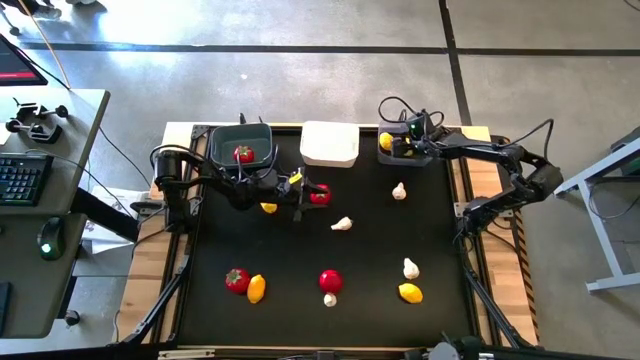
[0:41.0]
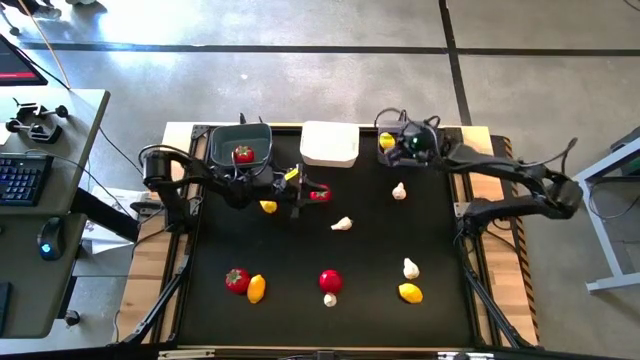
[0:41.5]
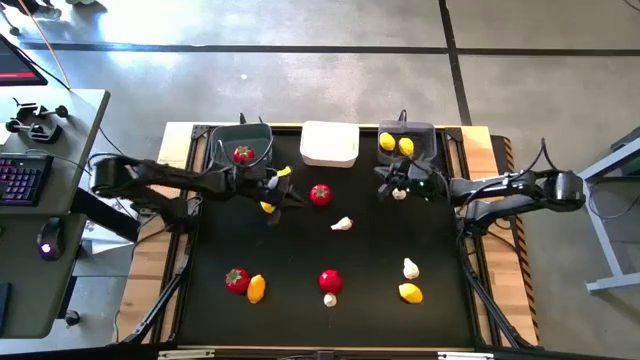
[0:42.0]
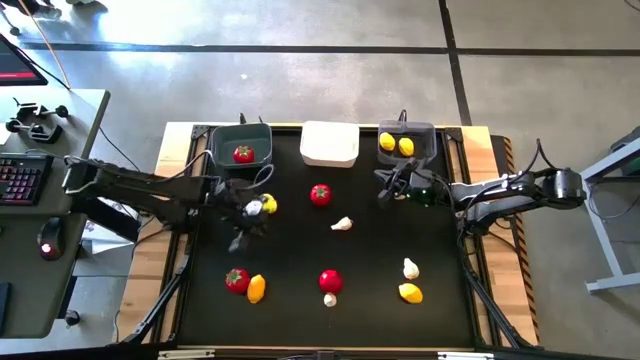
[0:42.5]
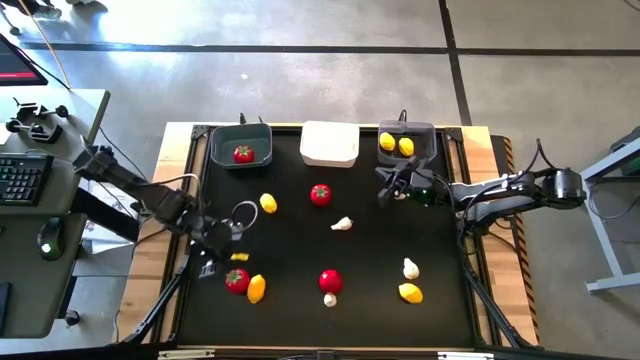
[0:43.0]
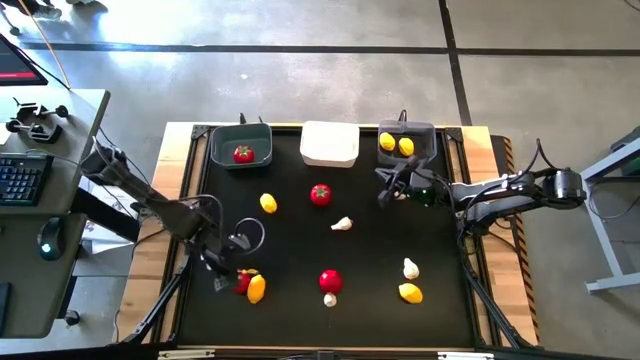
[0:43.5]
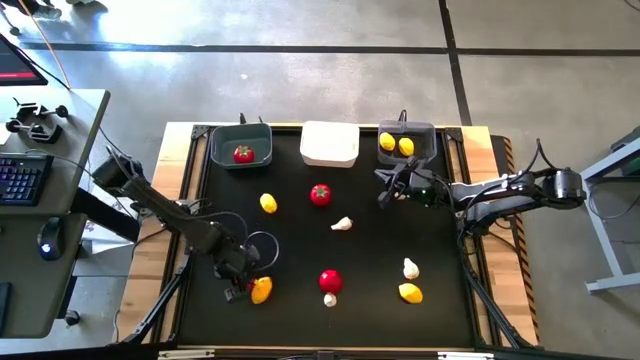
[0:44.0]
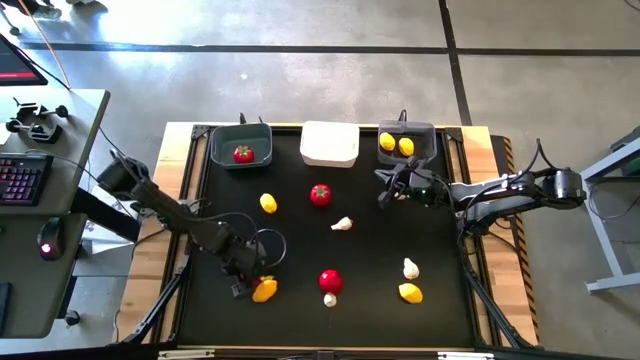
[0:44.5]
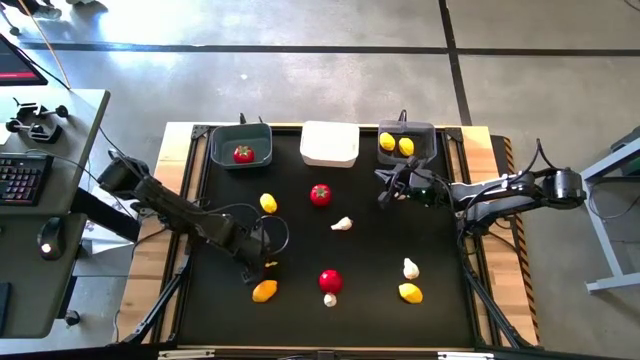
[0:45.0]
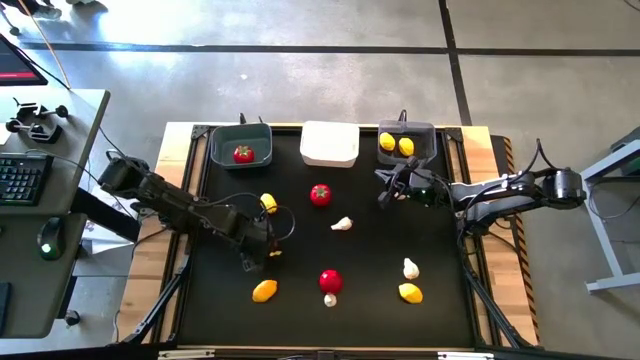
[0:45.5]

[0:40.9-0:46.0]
Task: Sort produce into baskets
Put the bottom left red tomato into the gray bin

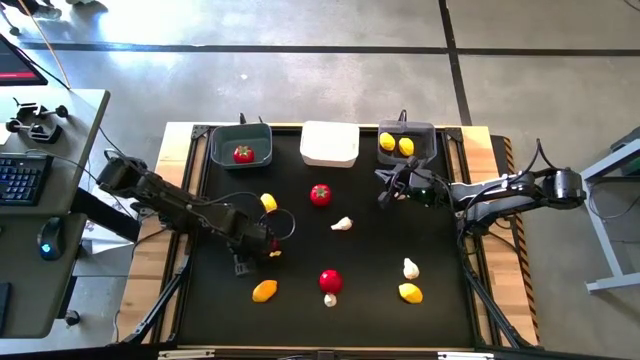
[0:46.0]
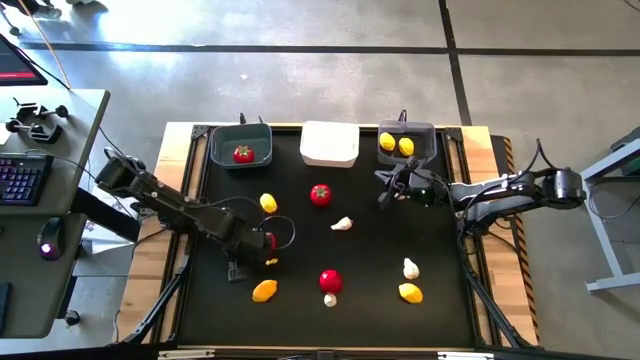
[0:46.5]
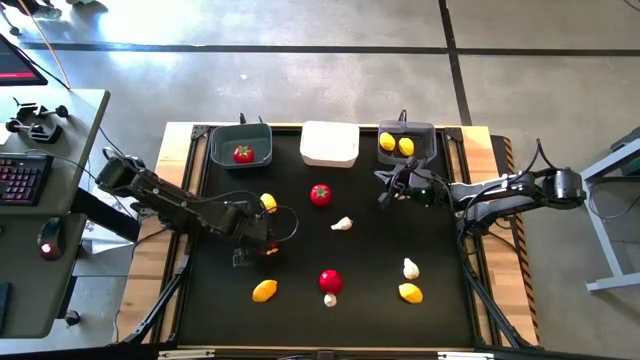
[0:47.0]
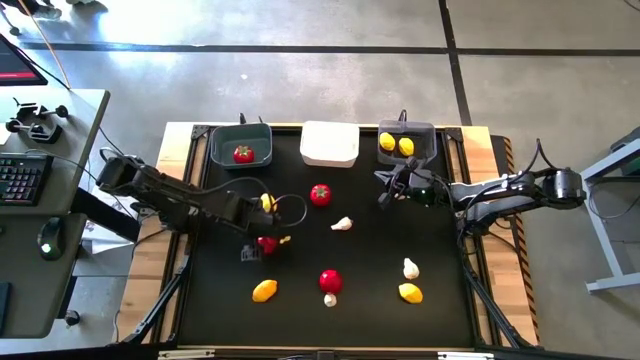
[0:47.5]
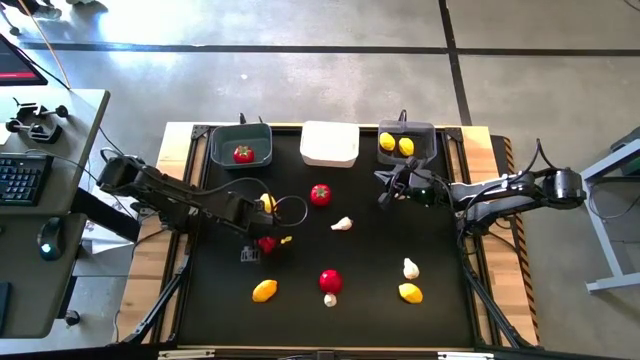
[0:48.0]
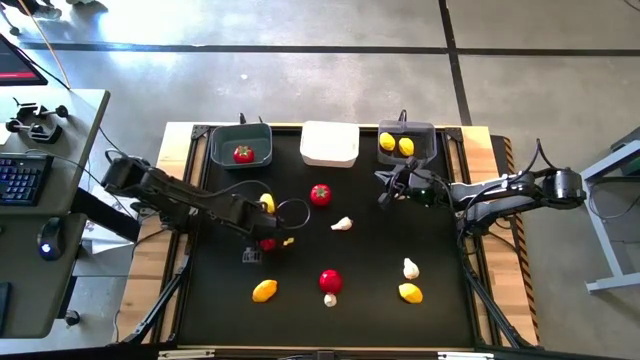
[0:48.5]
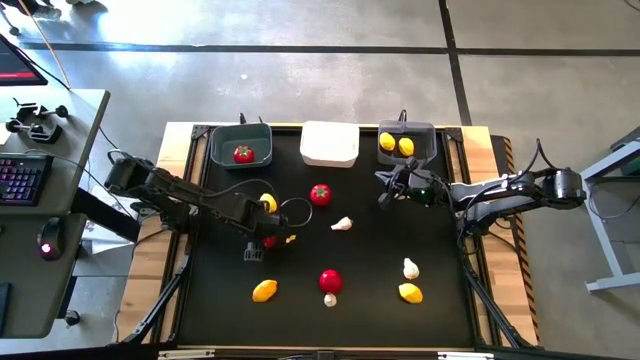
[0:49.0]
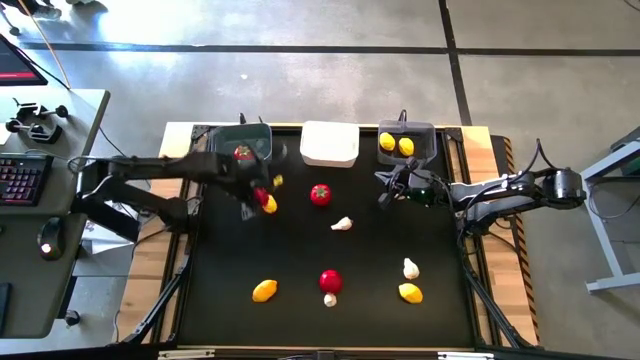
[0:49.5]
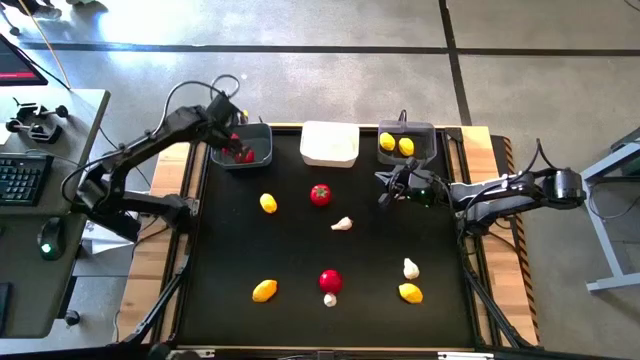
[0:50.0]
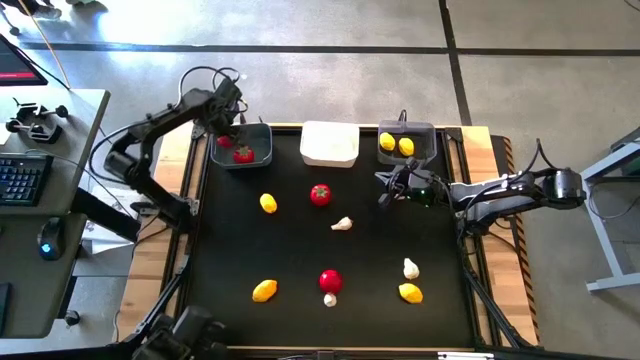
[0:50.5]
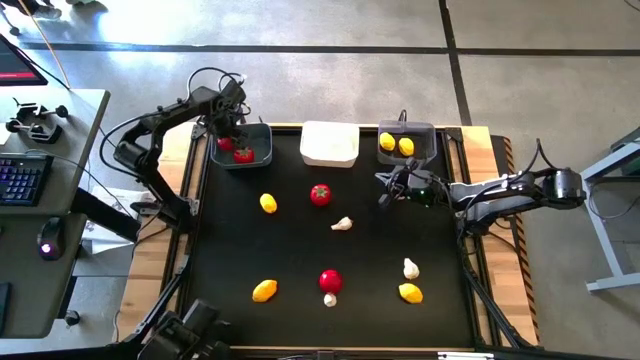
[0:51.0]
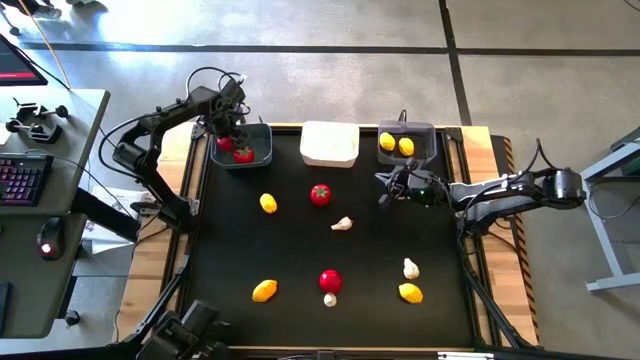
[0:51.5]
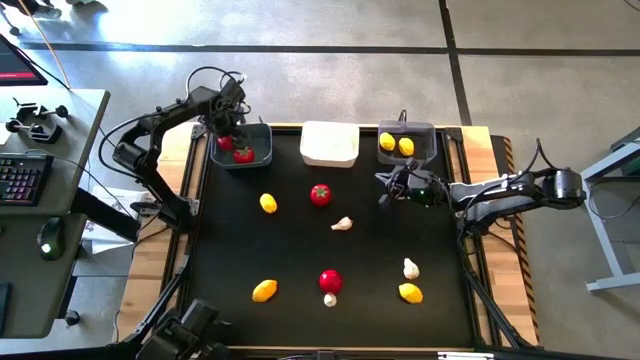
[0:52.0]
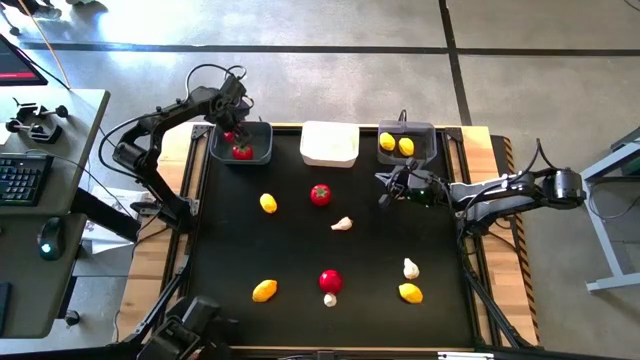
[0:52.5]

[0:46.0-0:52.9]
Put the bottom left red tomato into the gray bin

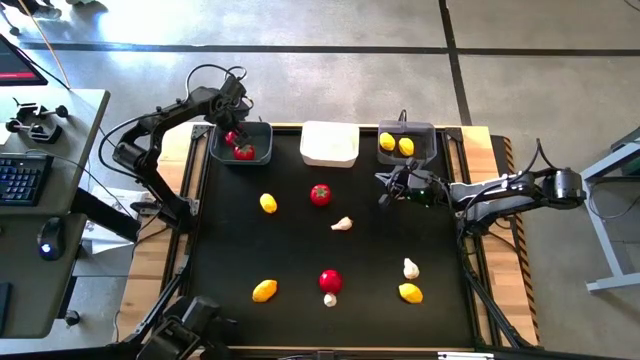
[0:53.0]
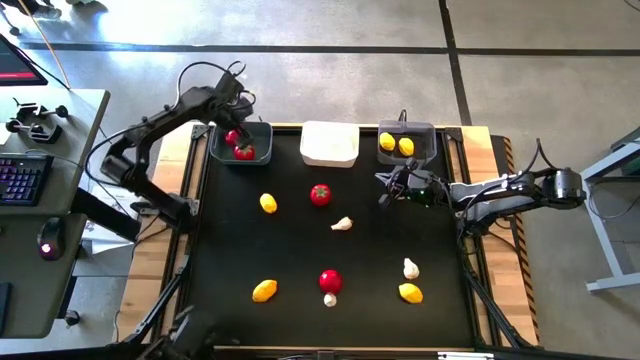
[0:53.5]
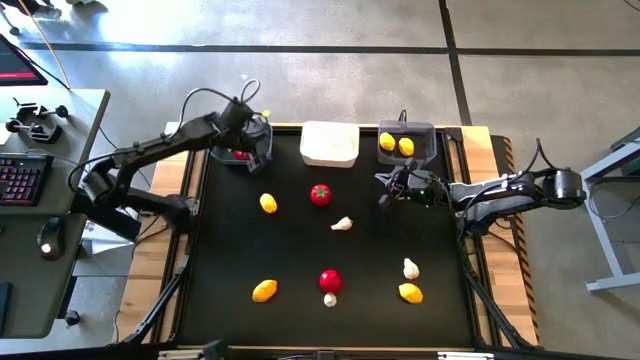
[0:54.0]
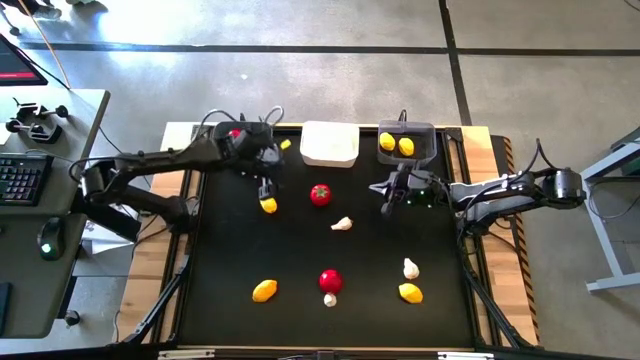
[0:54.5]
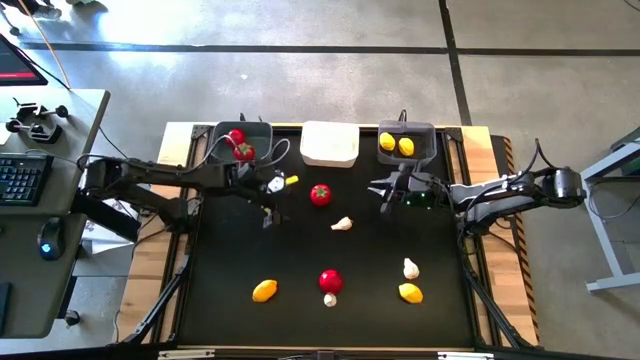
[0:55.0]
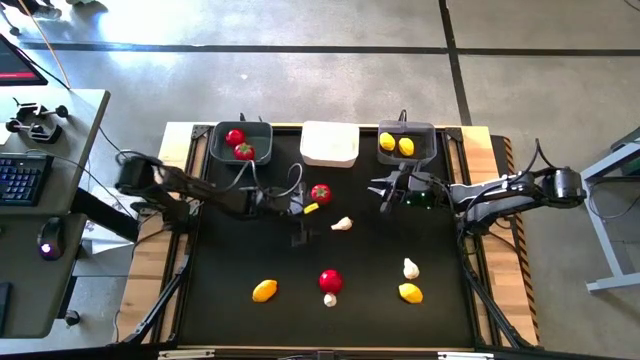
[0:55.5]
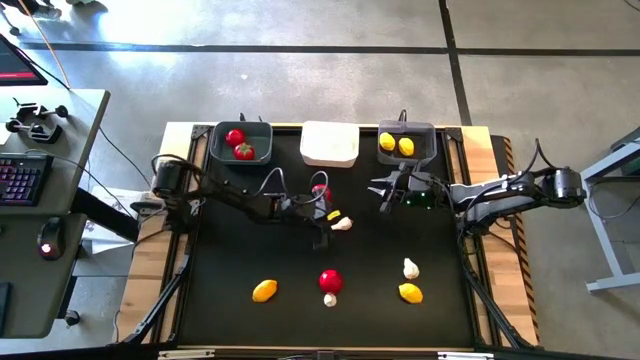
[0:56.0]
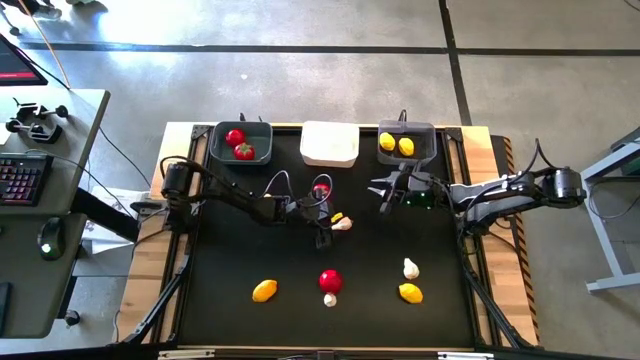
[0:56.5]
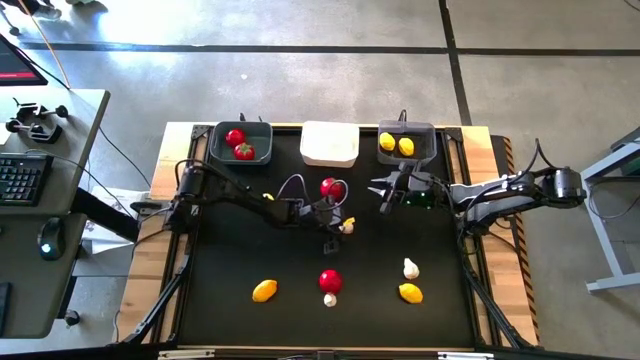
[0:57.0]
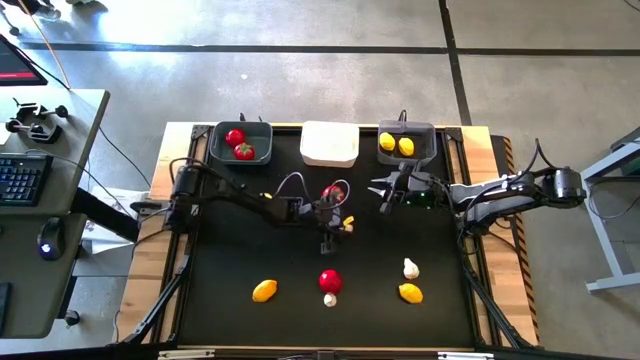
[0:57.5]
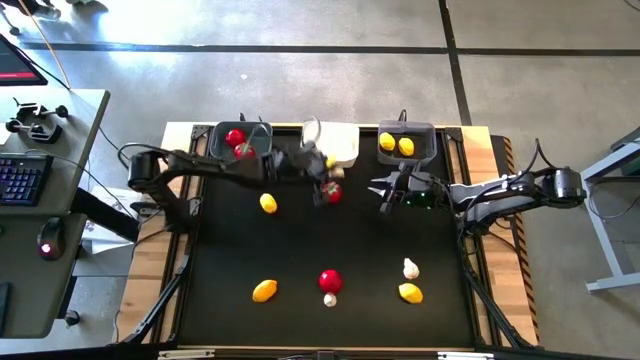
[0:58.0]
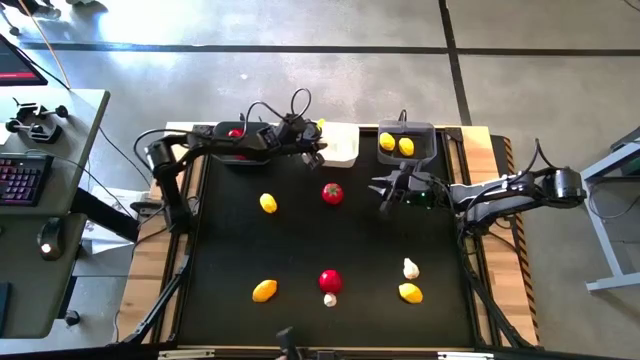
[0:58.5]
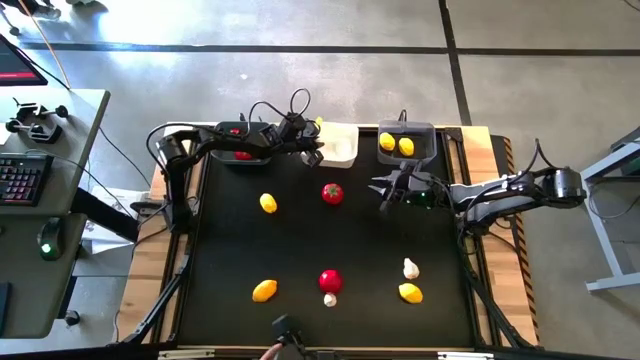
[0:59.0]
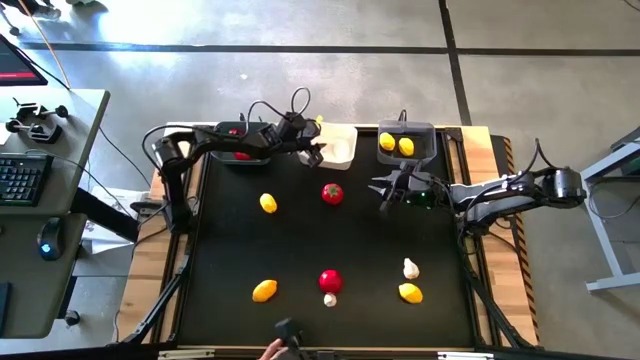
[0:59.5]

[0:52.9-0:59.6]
Put the top white garlic into the white bin

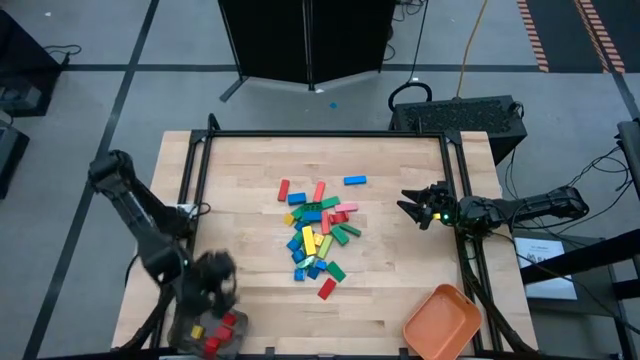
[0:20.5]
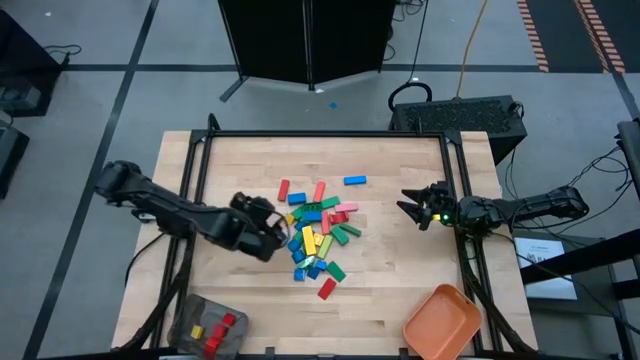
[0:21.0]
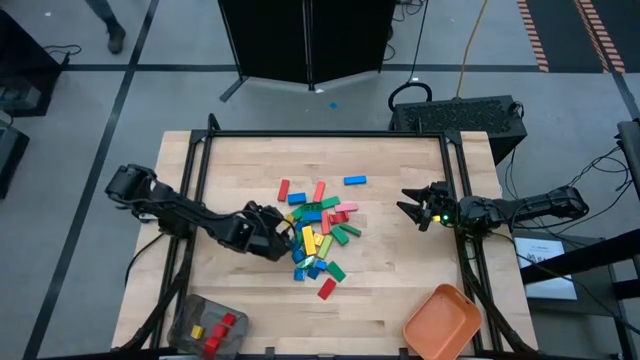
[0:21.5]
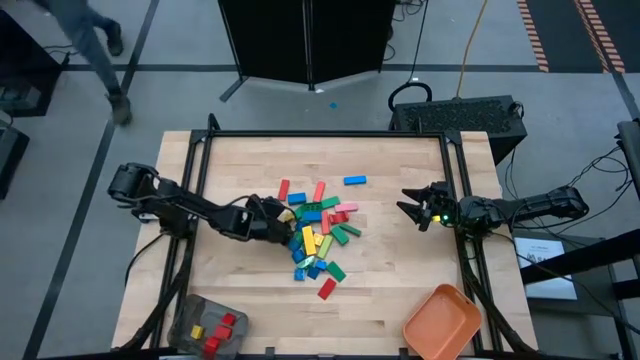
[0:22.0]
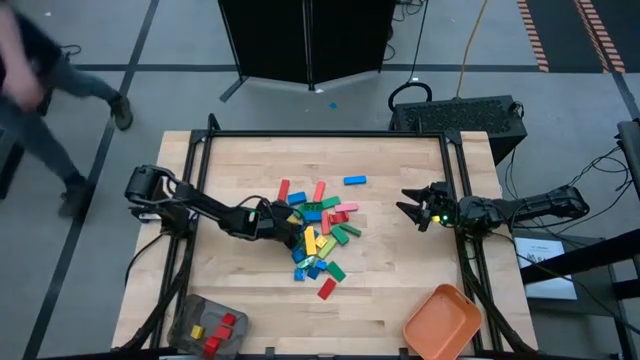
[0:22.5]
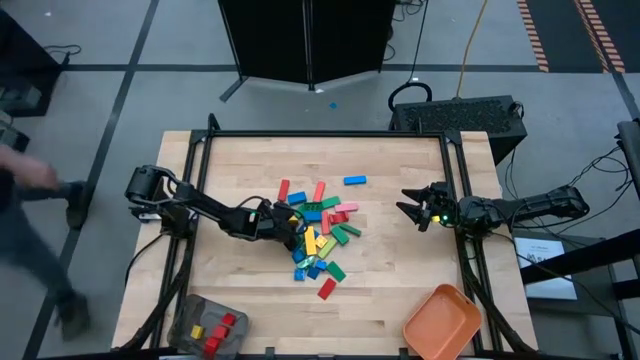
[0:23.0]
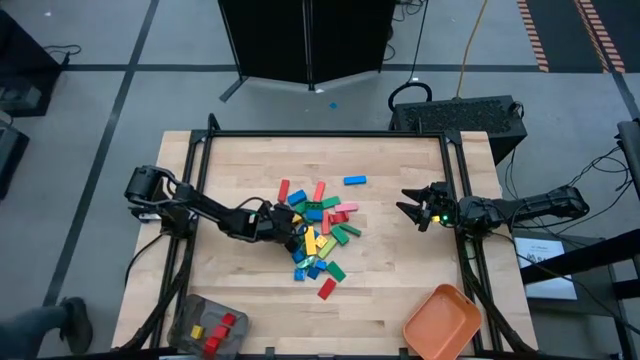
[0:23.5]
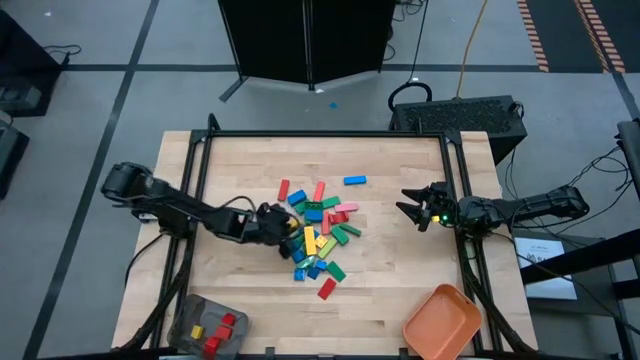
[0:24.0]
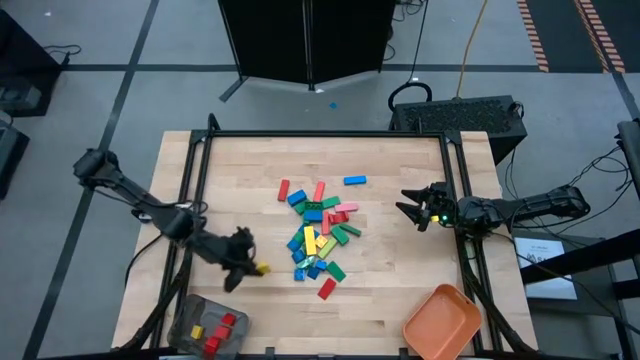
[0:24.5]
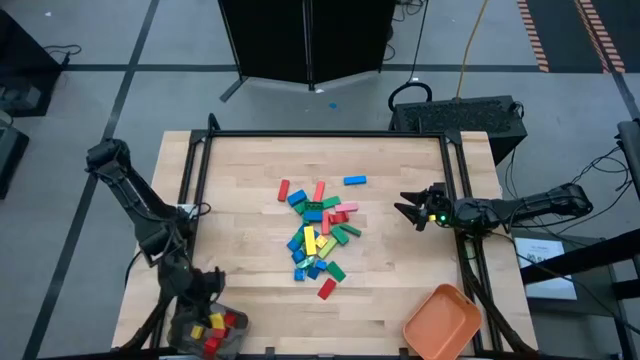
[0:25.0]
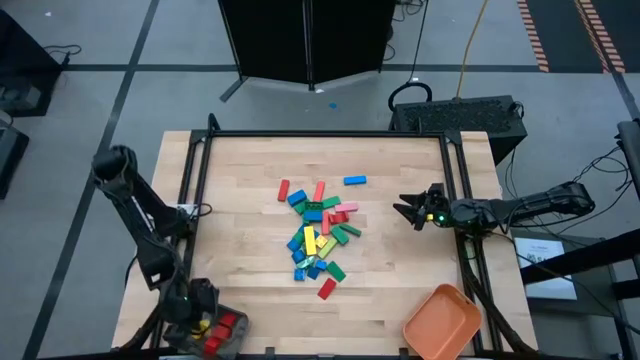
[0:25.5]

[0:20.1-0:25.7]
Task: Sort blocks by size
Put the yellow triangular block into the black bin
